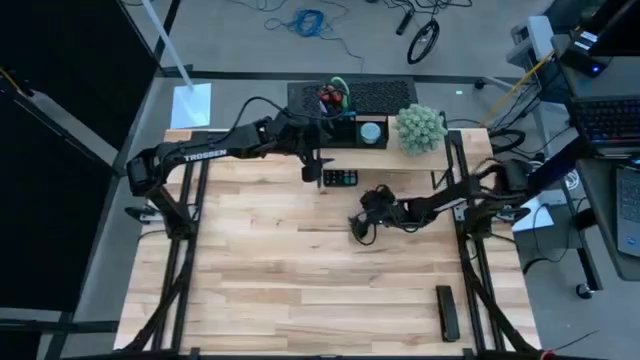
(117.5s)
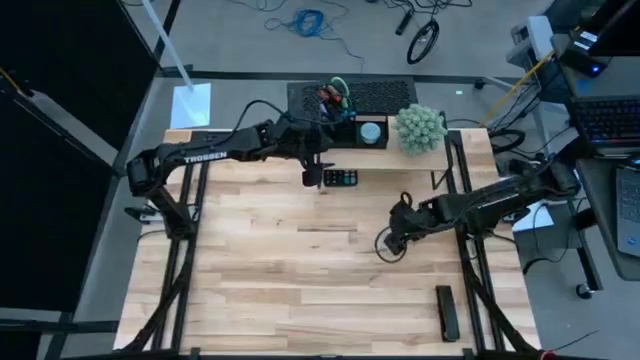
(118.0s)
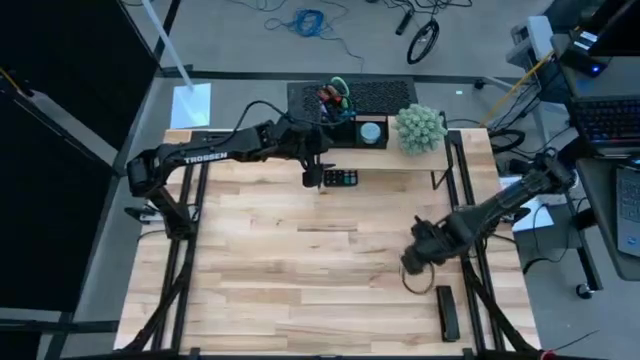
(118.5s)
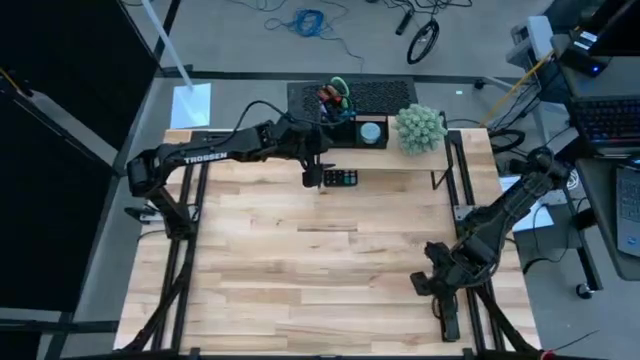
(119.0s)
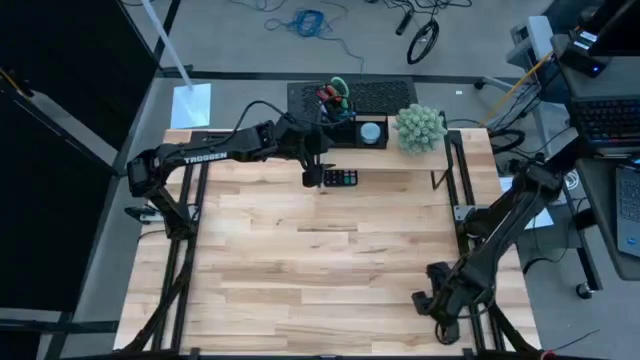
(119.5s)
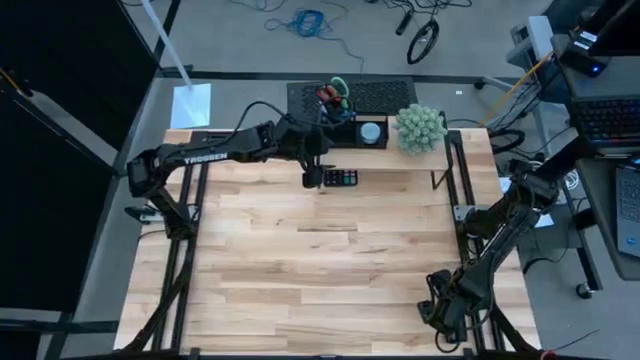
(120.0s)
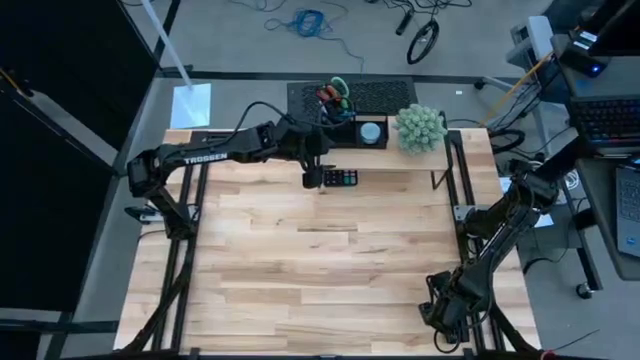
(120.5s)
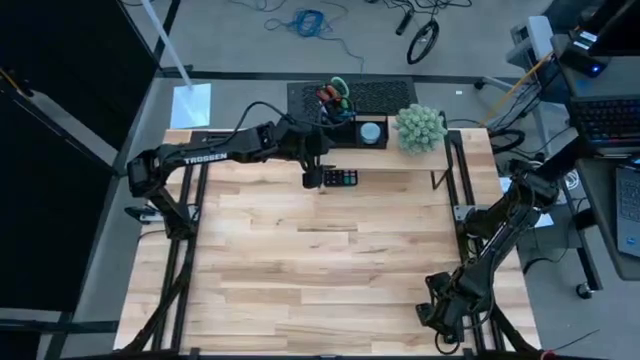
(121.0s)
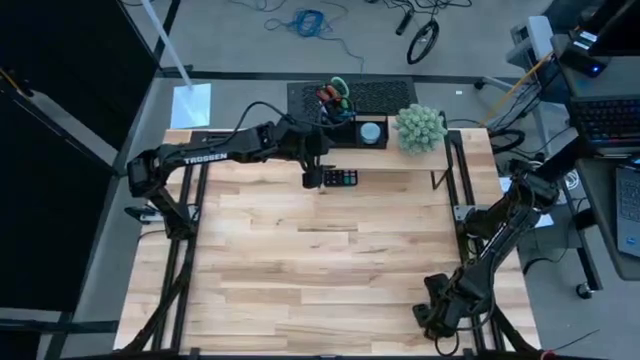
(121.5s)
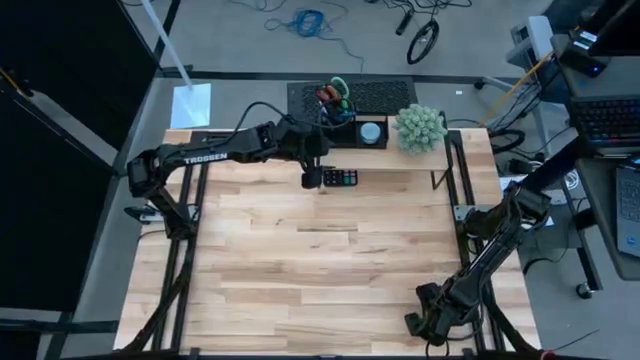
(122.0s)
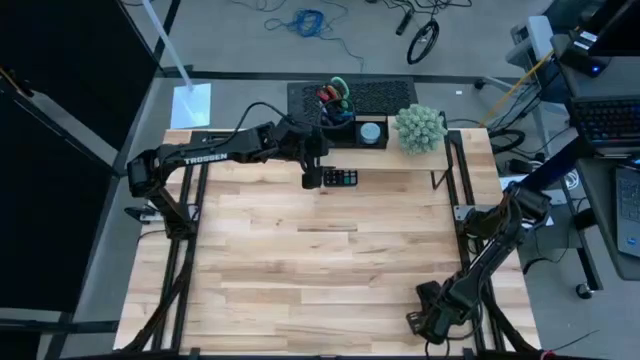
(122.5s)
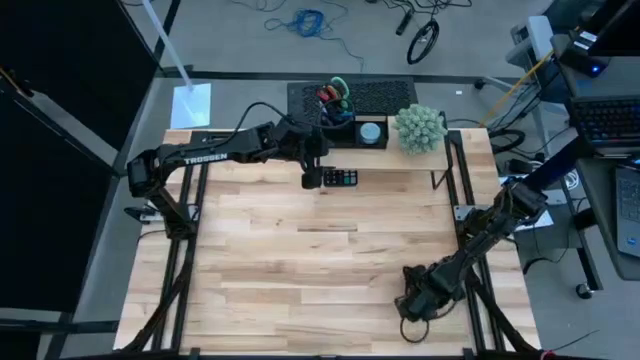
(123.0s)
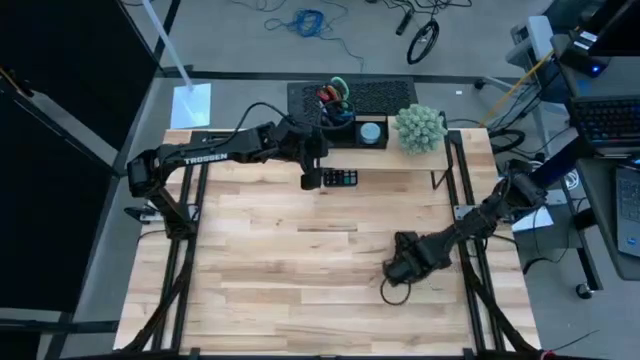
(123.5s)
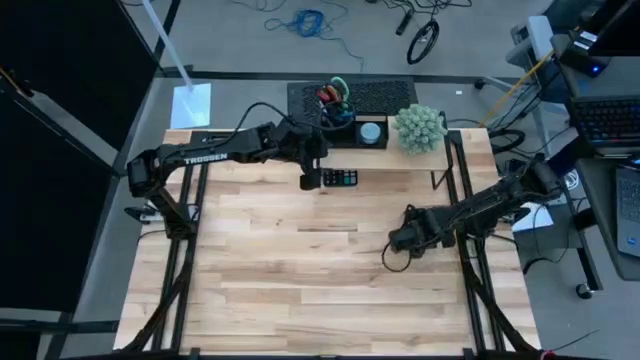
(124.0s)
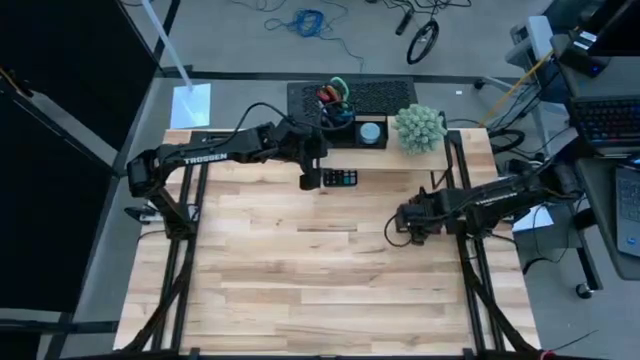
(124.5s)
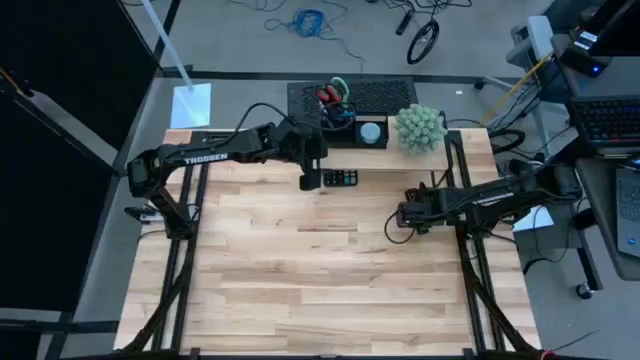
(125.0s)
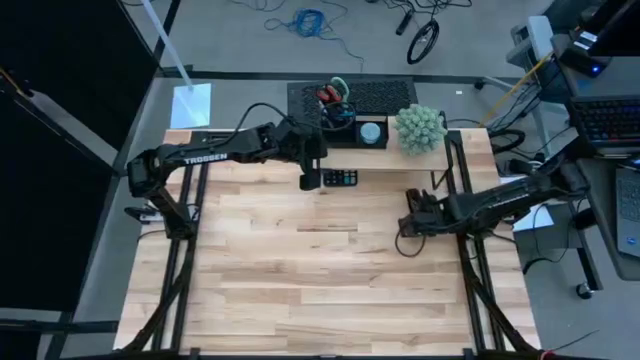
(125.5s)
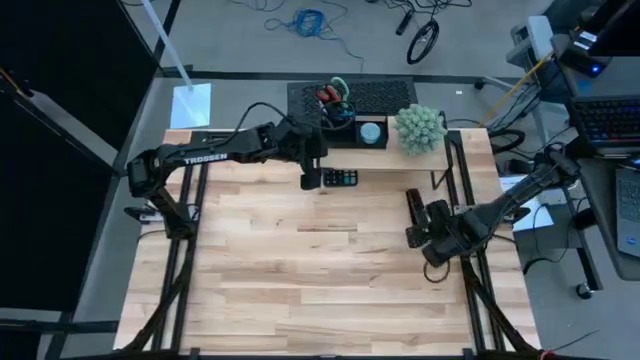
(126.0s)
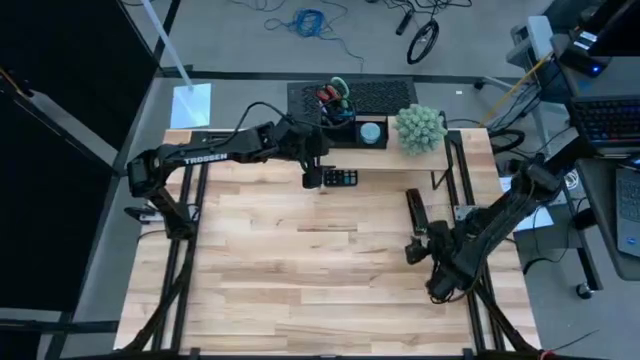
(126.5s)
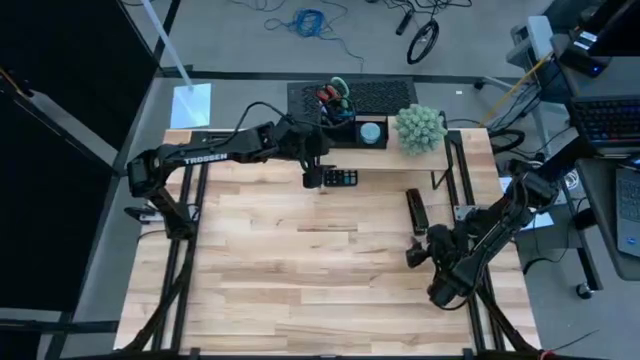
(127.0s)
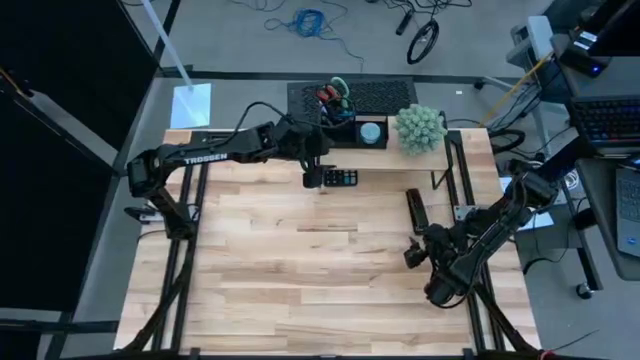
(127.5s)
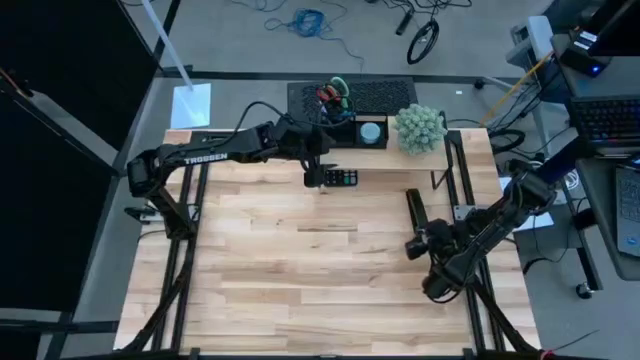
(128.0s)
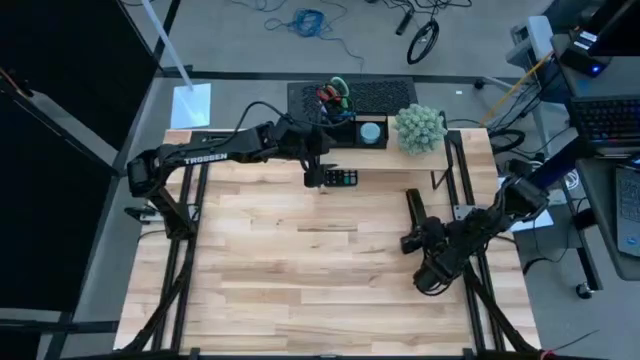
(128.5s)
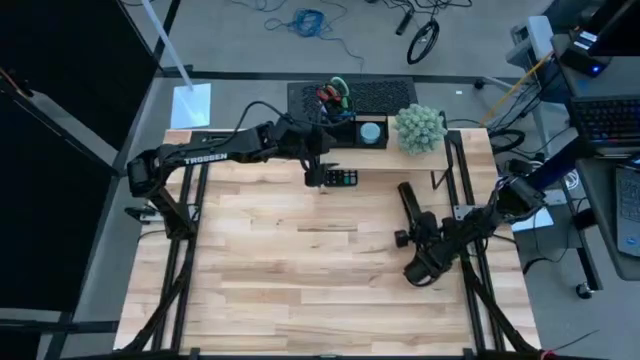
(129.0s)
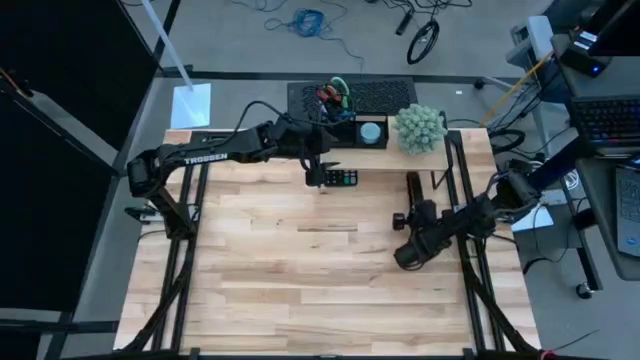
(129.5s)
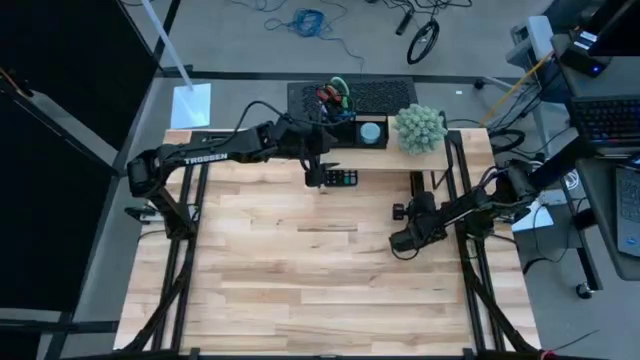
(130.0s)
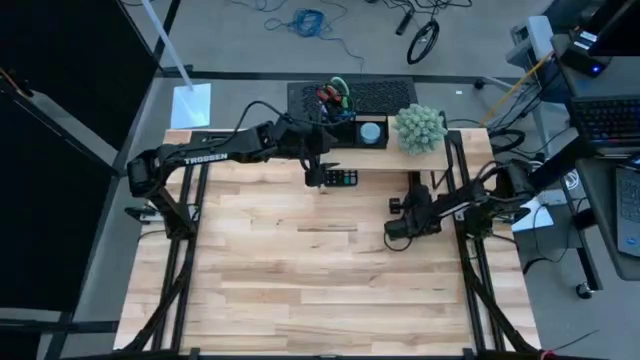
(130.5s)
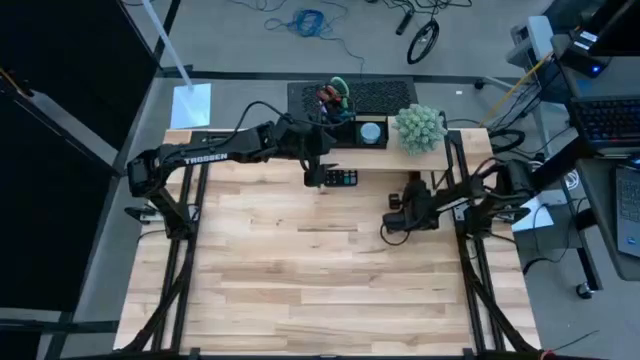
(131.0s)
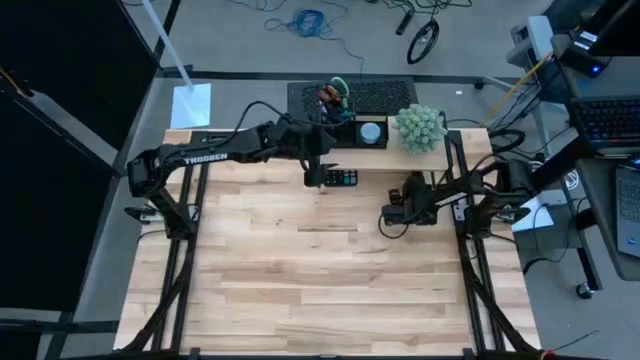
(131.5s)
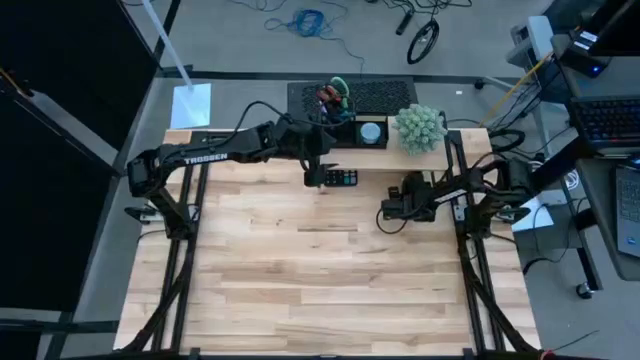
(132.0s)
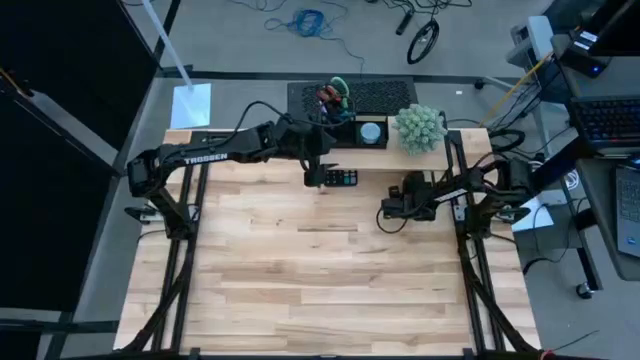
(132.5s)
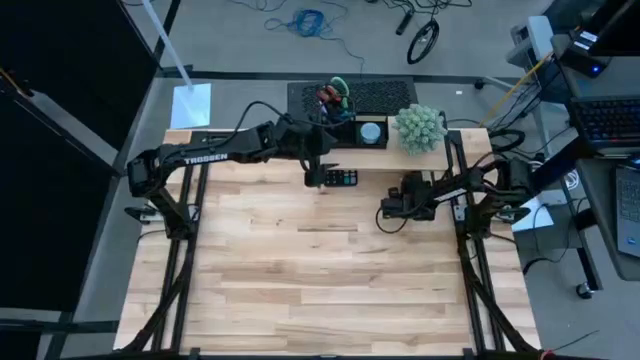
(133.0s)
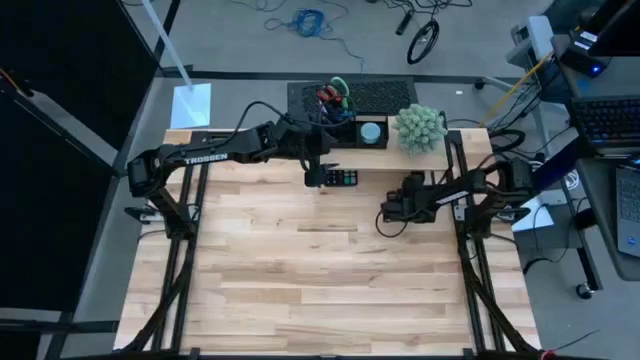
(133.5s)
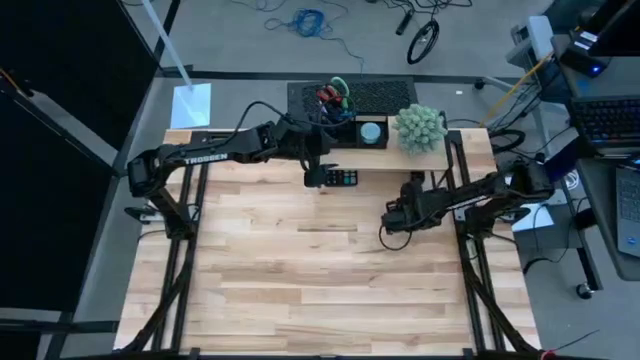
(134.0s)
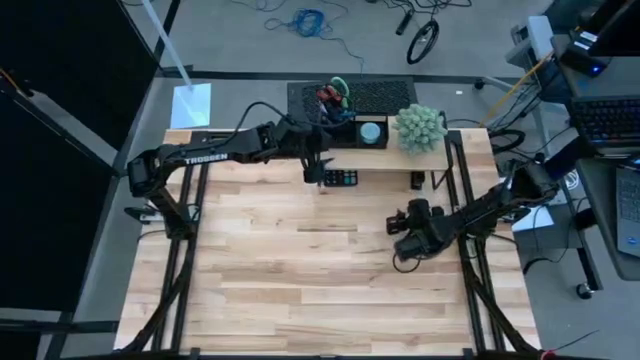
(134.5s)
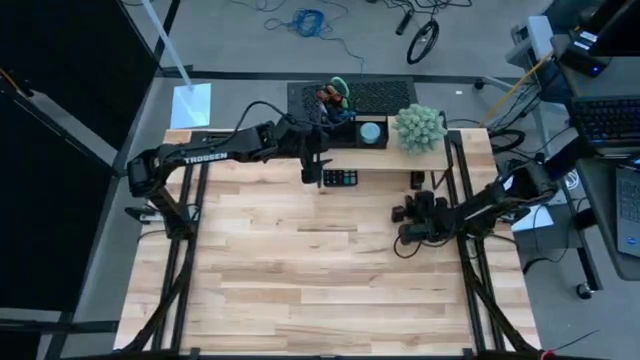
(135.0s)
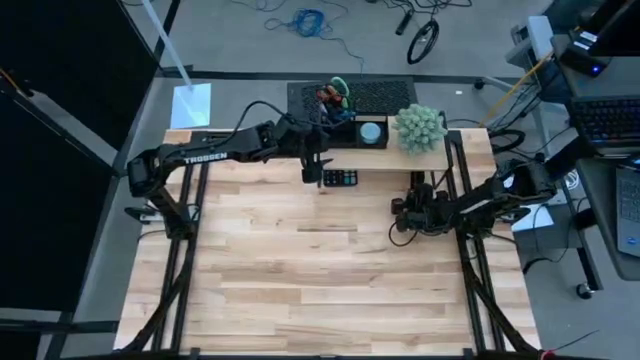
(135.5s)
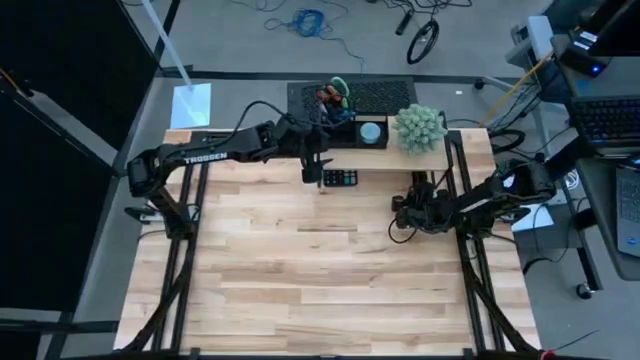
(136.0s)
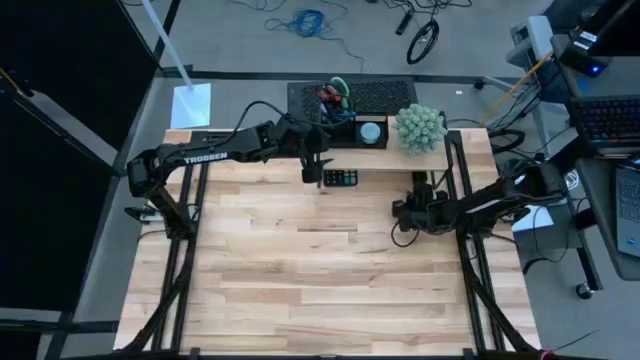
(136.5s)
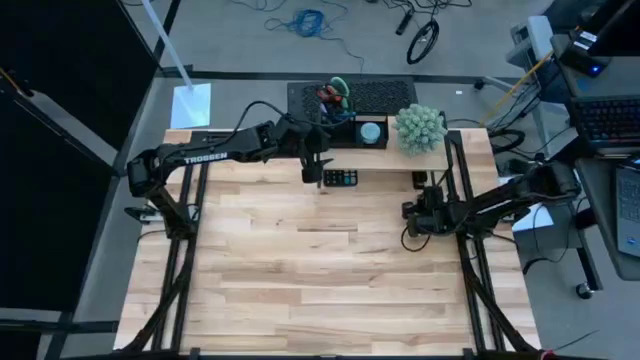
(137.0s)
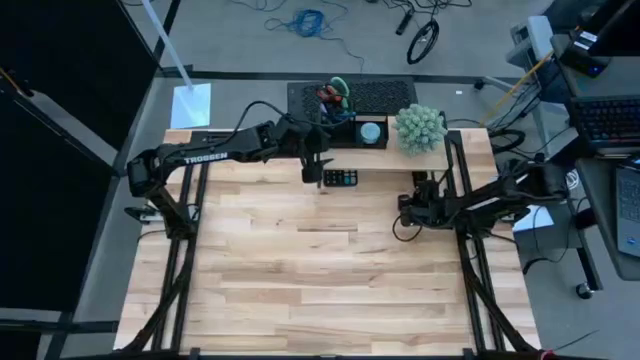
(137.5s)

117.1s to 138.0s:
Task: Pick and place office supplies into organizer
Put the black stapler under the wooden shelf
